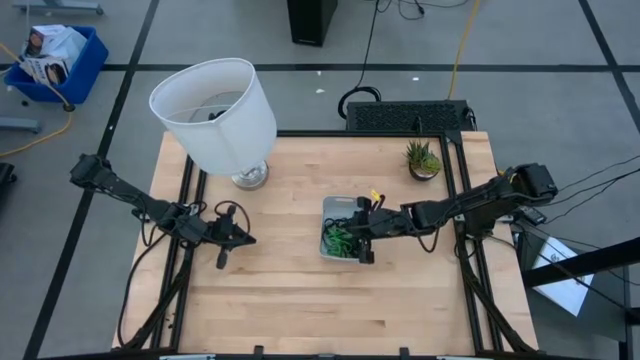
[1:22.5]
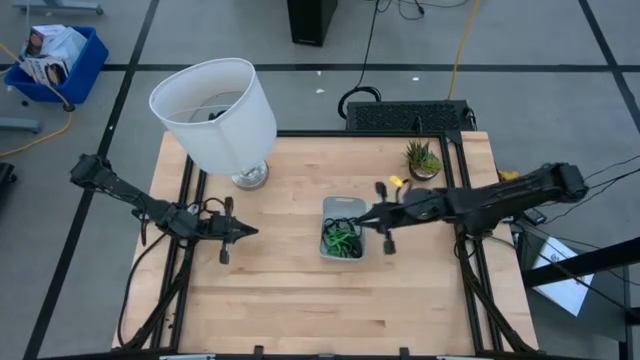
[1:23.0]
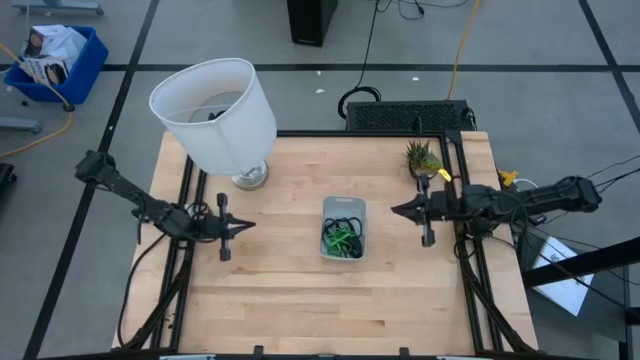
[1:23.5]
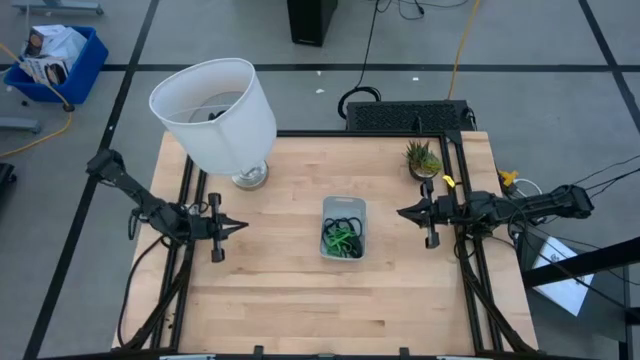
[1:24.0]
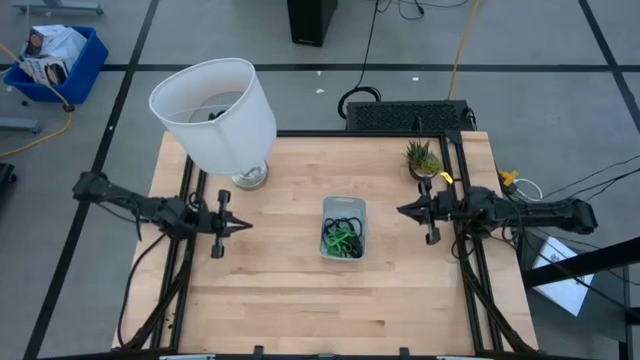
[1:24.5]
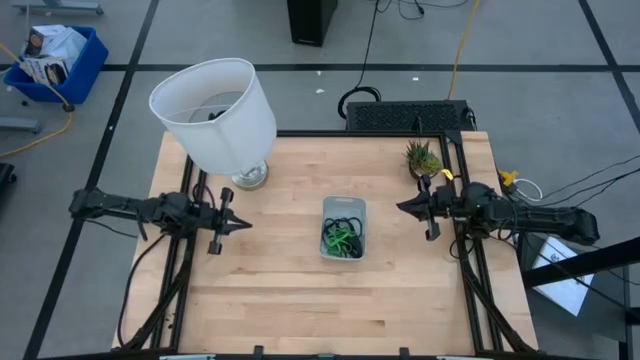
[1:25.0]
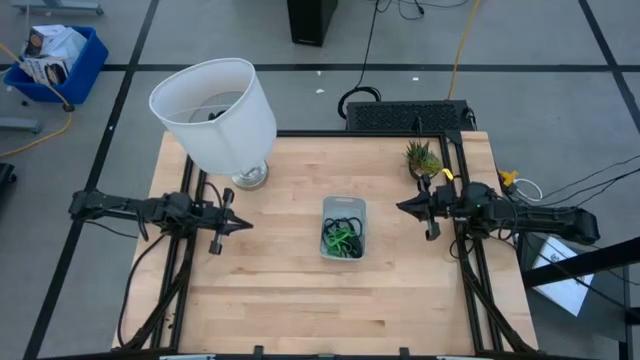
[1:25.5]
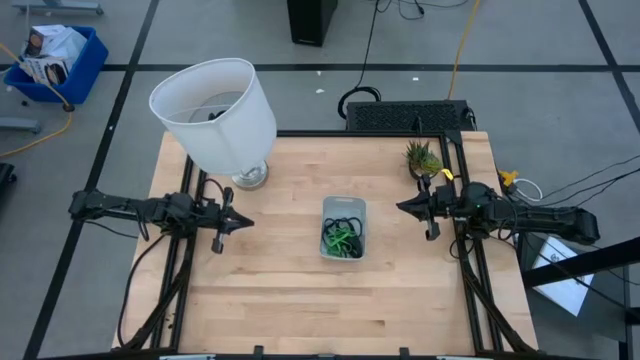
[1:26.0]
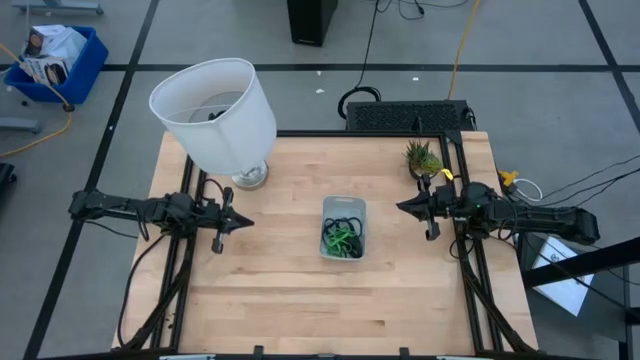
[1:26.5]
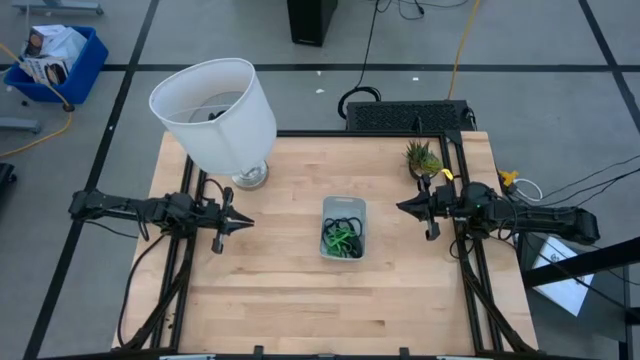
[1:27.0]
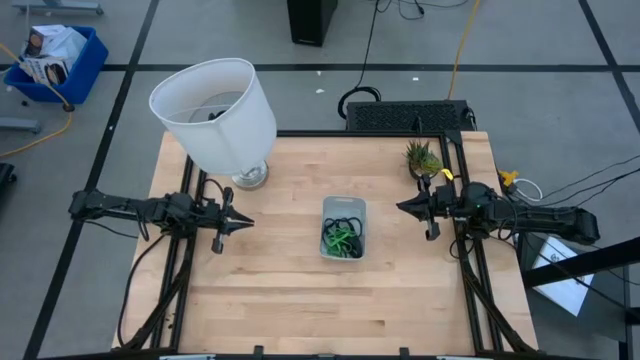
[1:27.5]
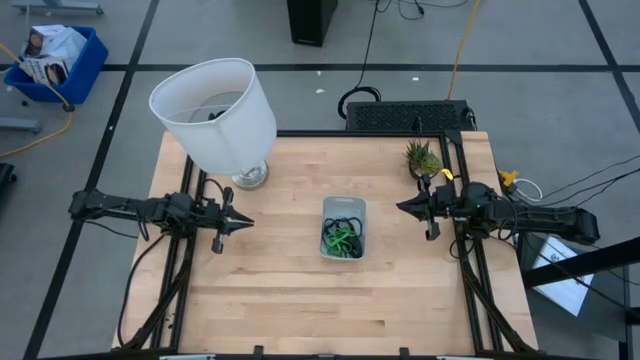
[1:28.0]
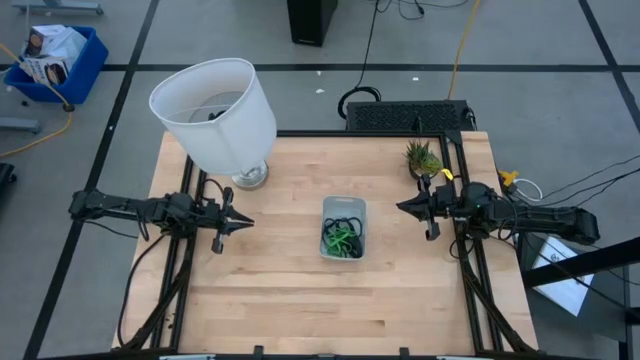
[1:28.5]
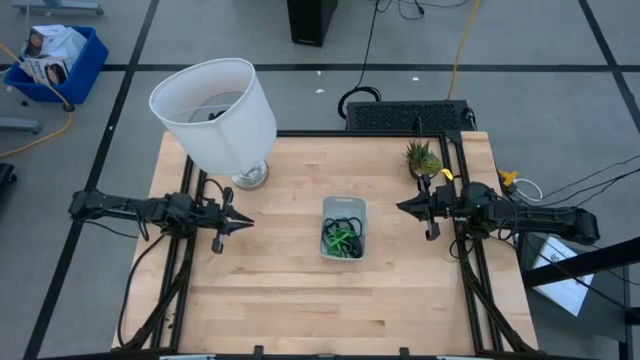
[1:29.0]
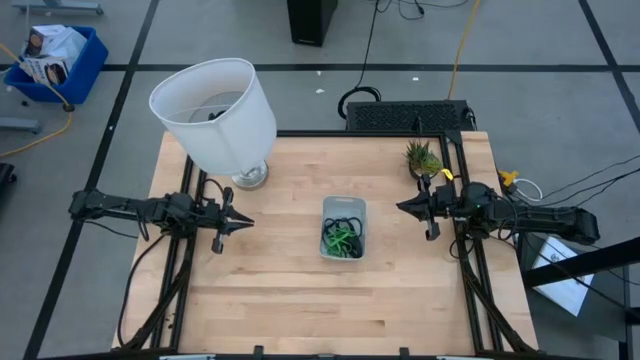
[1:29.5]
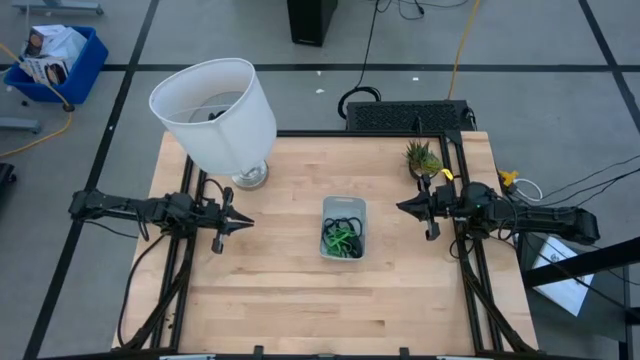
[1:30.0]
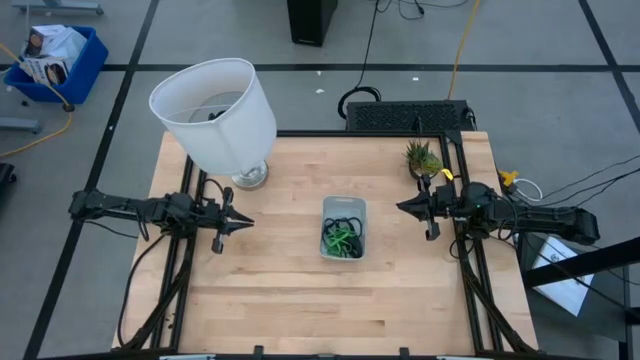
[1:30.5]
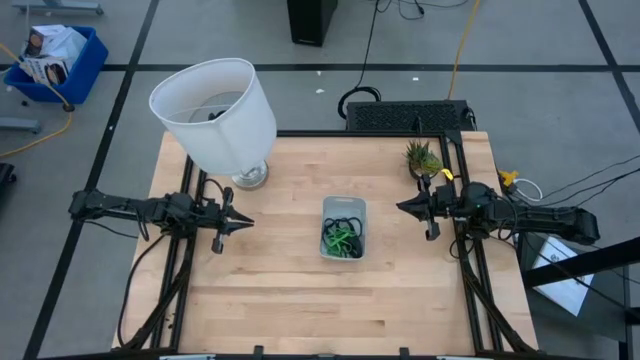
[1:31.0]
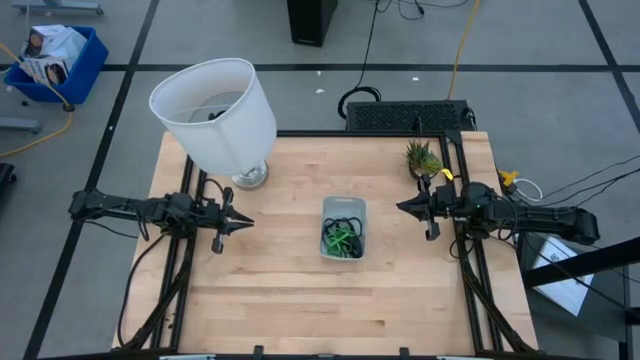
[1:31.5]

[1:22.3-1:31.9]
Task: Pick and place rubber bands into bin
Return to Home Position

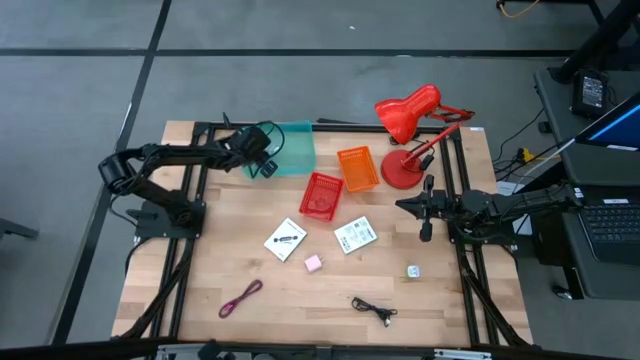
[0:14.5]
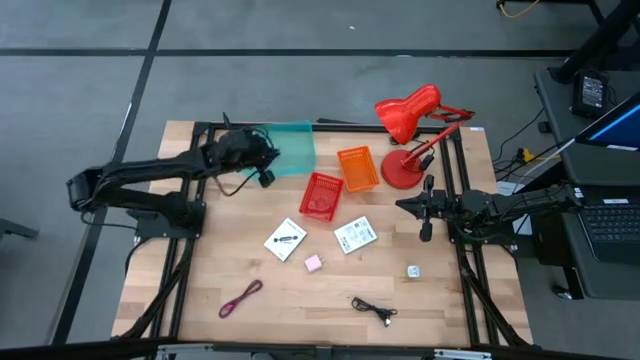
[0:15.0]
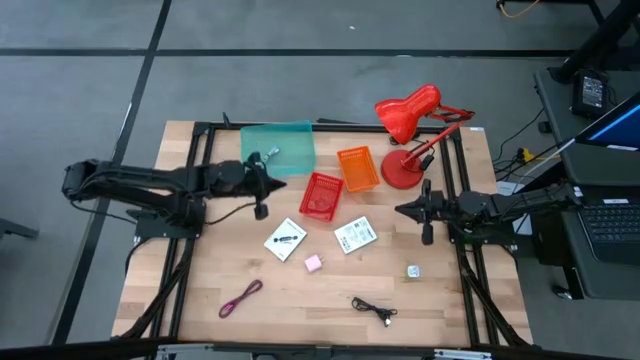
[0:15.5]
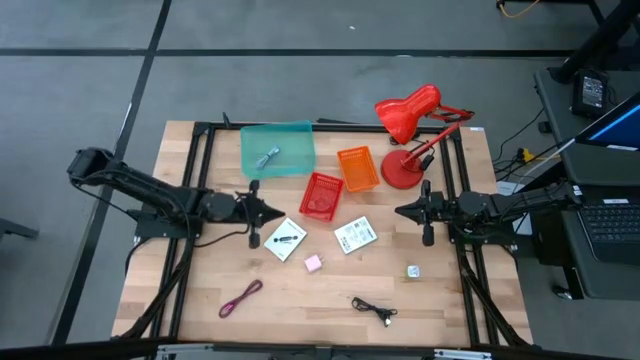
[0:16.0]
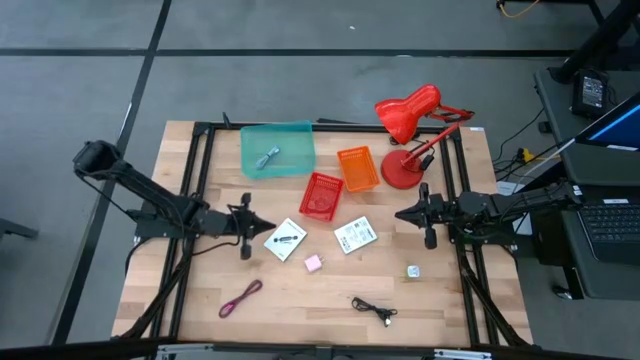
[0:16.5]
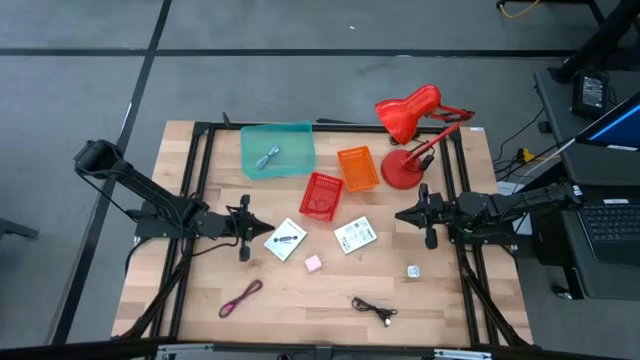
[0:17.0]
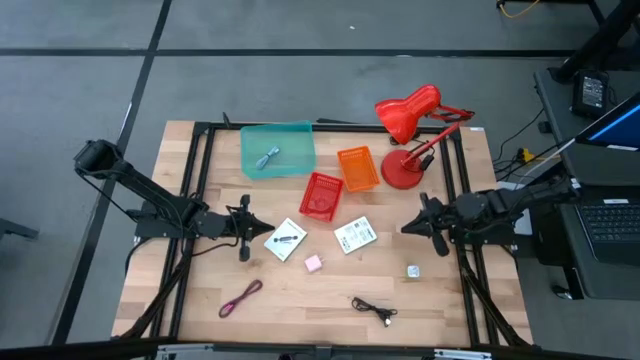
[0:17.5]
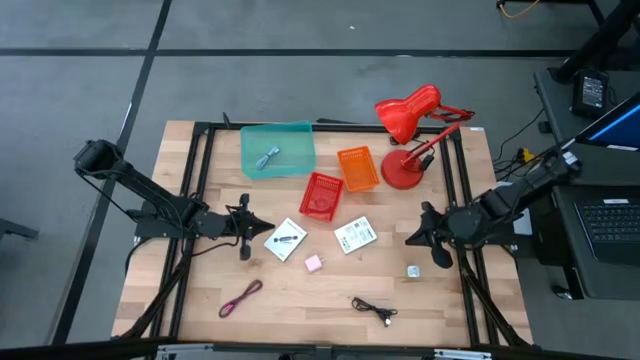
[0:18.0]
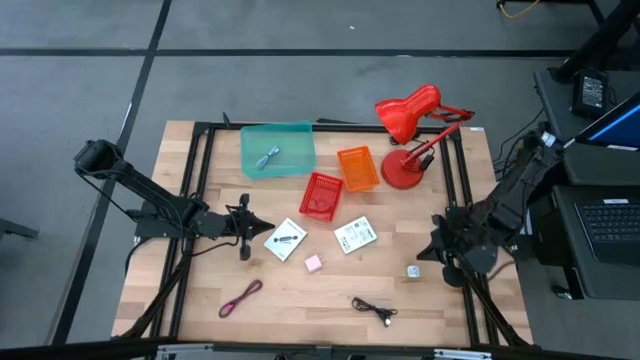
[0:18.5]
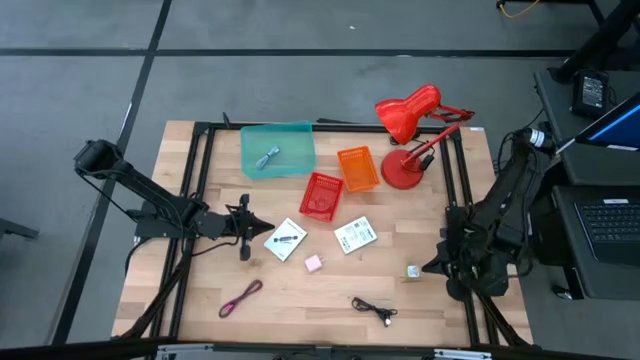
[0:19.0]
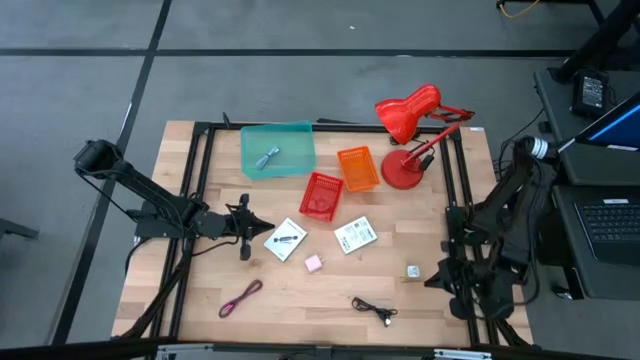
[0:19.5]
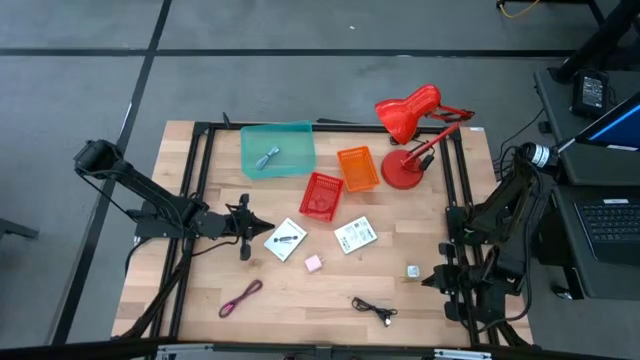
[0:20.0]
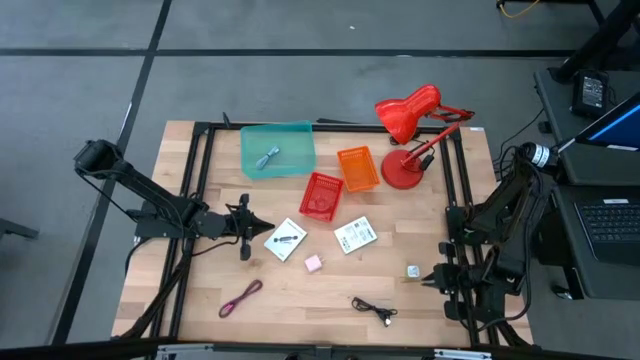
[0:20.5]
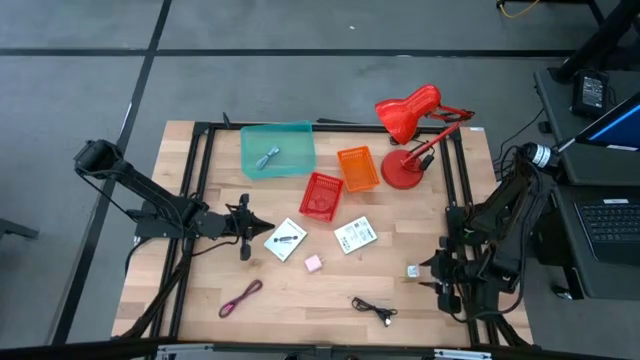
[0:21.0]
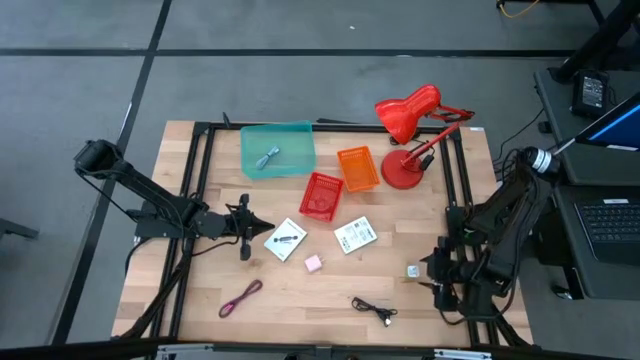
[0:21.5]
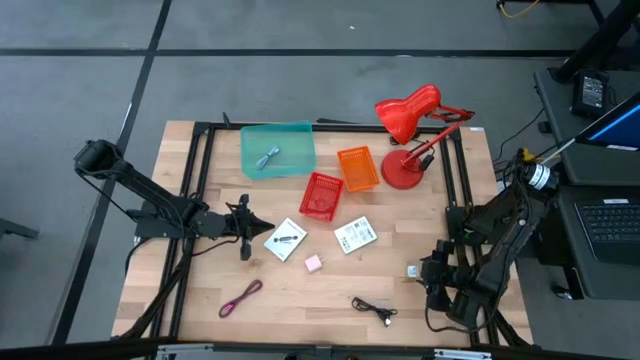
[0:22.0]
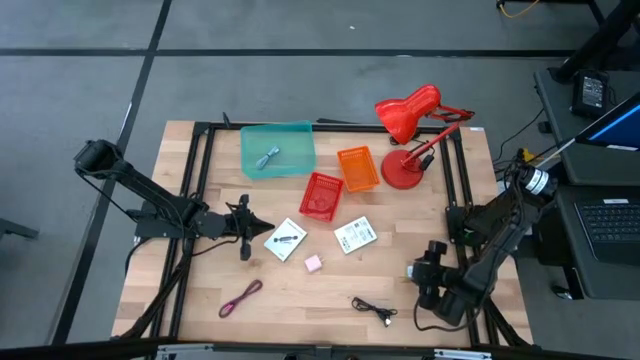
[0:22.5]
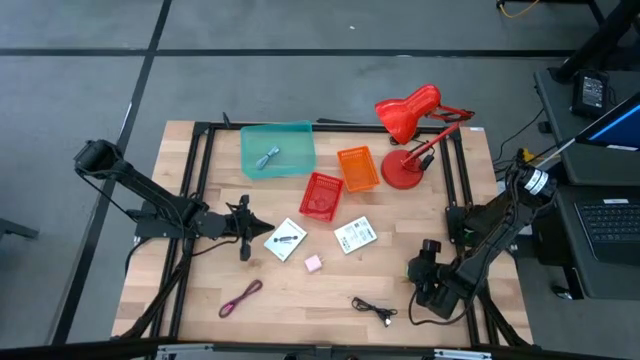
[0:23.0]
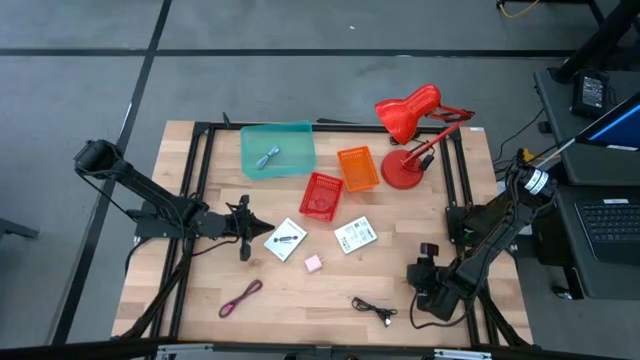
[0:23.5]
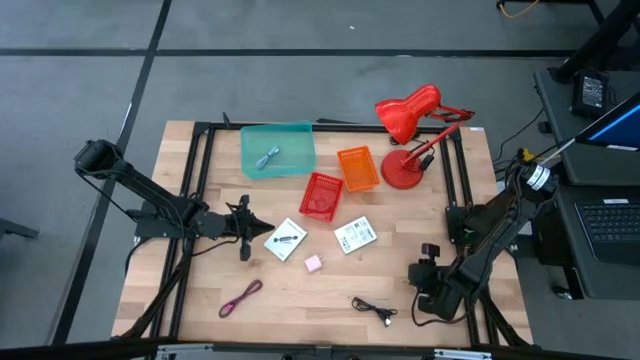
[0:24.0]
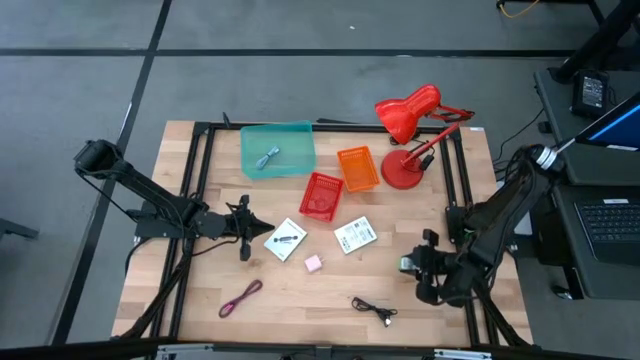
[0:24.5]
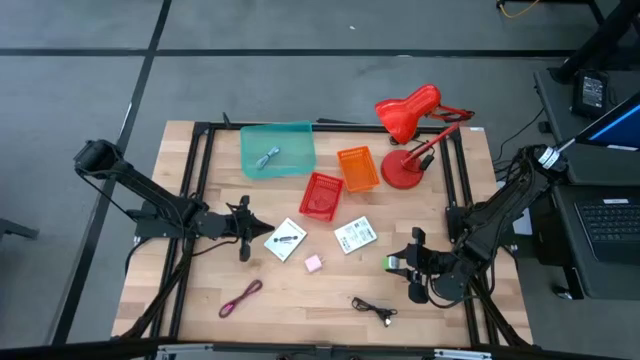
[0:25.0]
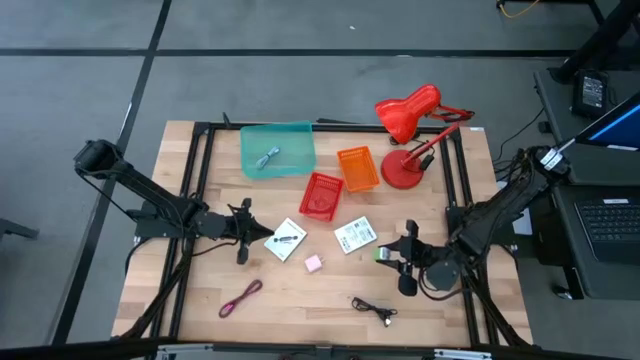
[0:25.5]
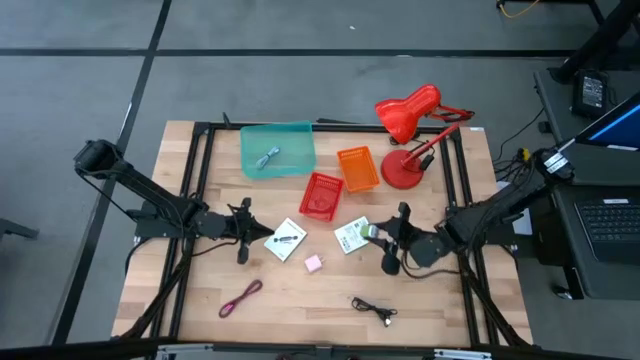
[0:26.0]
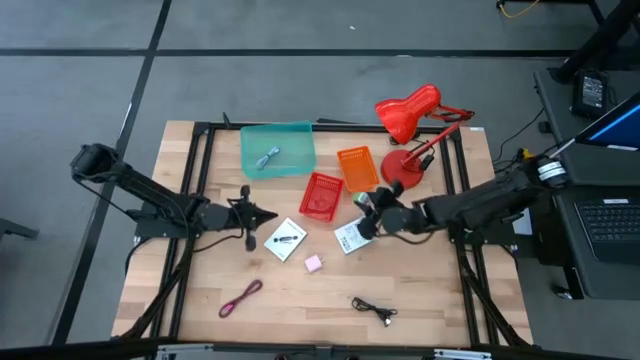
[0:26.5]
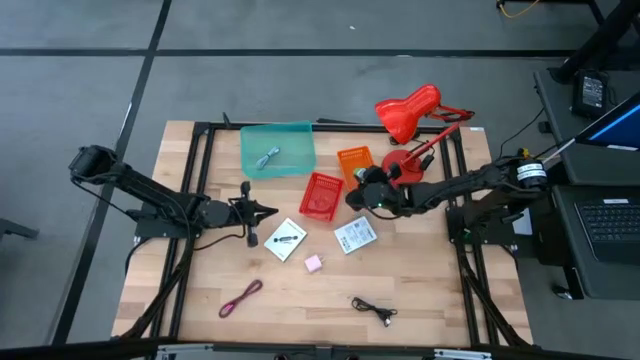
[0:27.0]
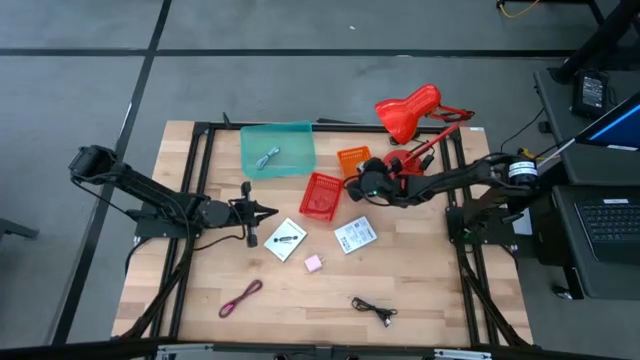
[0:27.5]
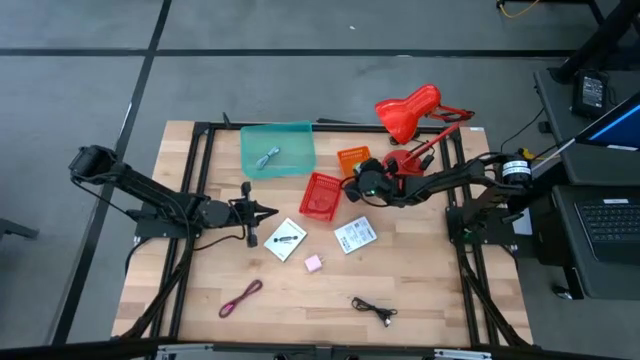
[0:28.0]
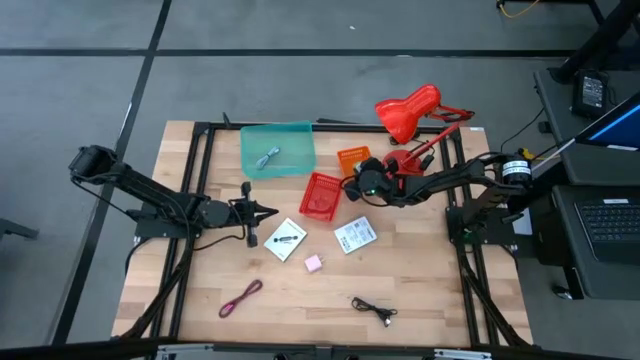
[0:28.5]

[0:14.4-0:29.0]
Task: Pick and place items into bin
Put the green charger adapter into orange bin
